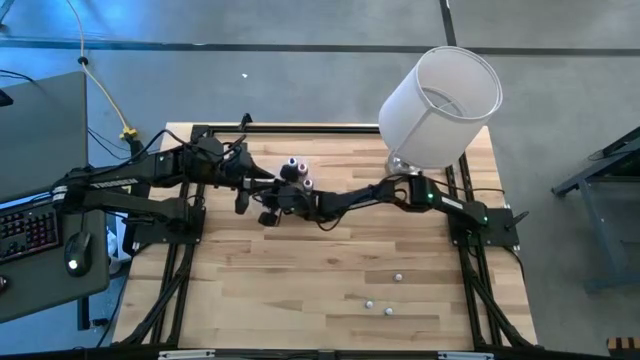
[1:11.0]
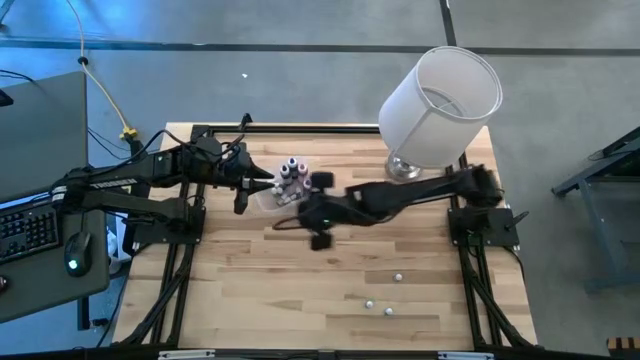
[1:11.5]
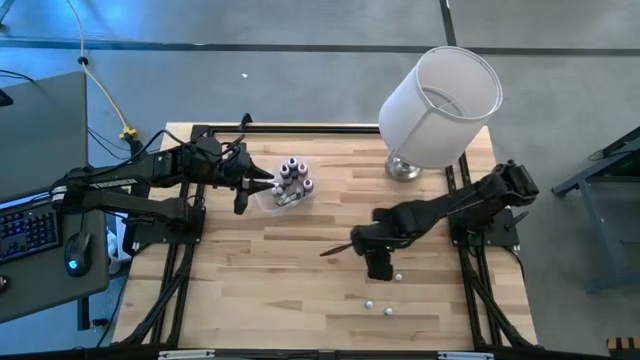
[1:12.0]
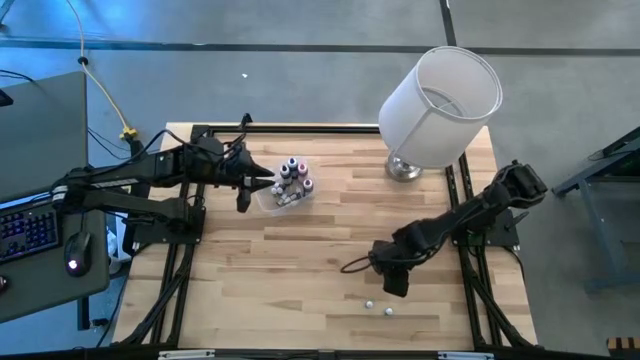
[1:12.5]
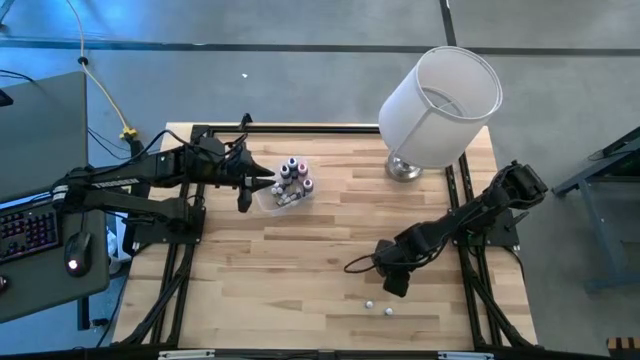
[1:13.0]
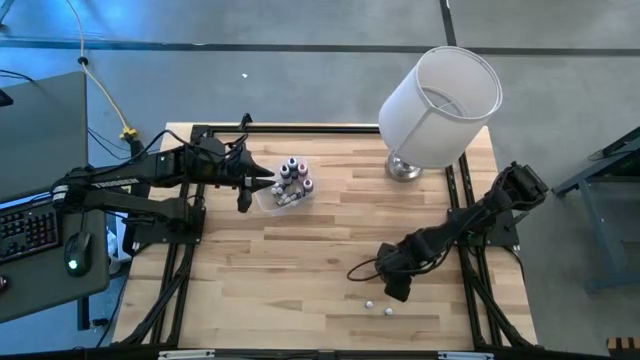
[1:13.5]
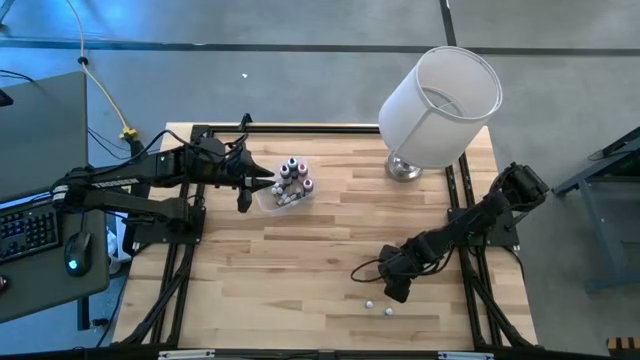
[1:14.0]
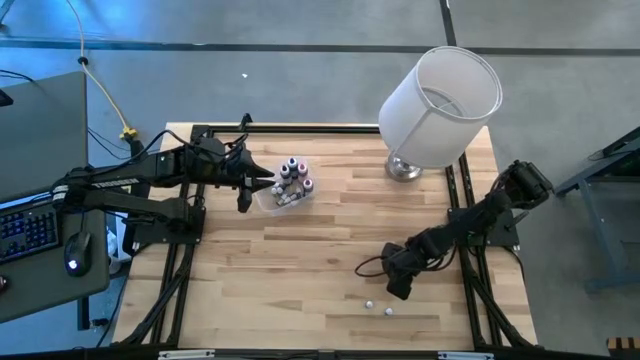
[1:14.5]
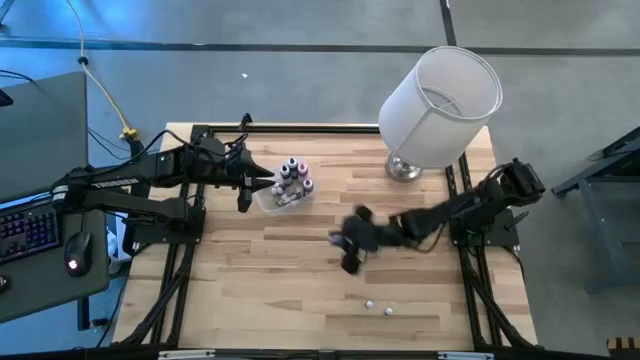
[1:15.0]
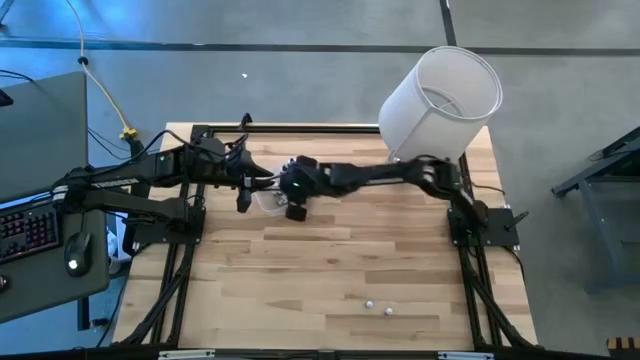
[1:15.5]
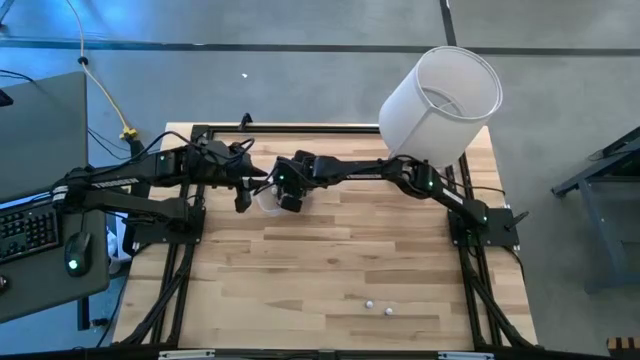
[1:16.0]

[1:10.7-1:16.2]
Task: Pick & Place food coloring
Put the small violet food coloring bottle into the transparent bin

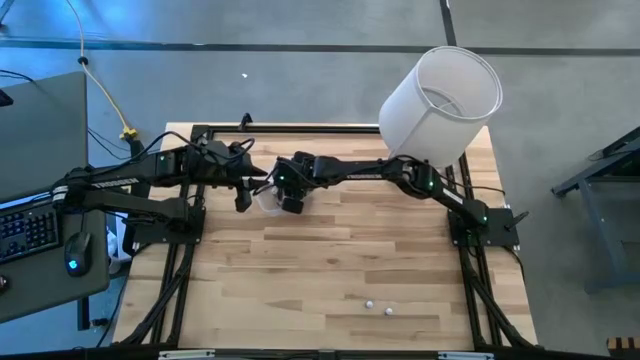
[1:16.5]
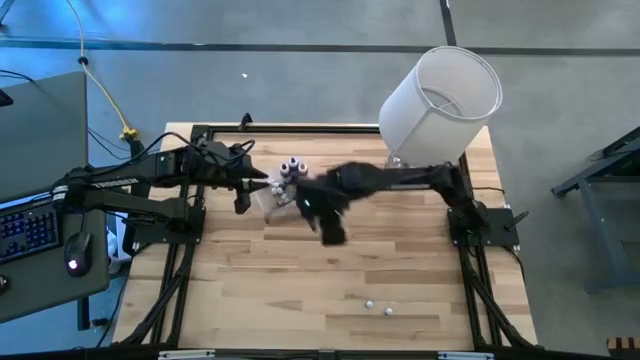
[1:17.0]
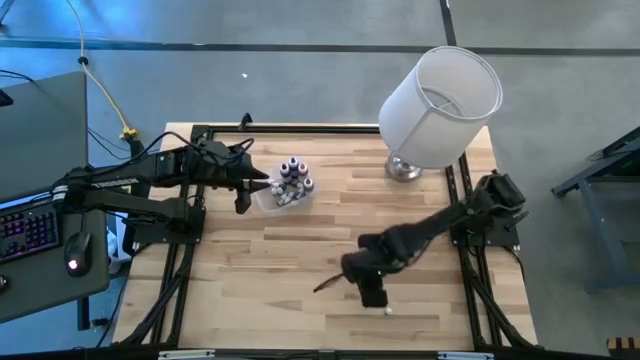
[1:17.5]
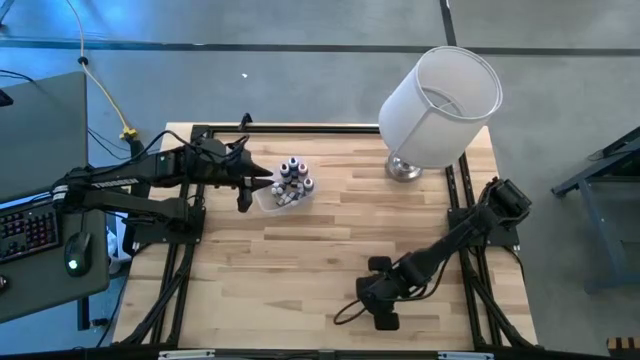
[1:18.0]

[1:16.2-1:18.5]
Put the small purple food coloring bottle into the transparent bin

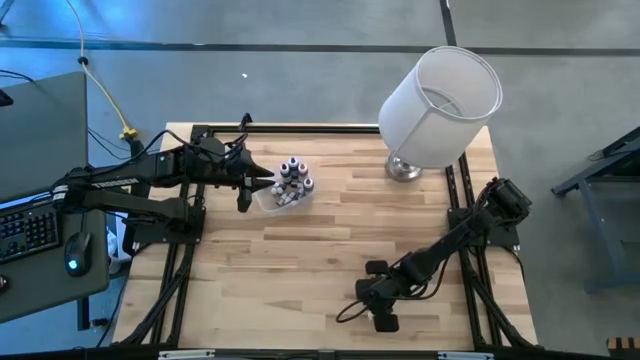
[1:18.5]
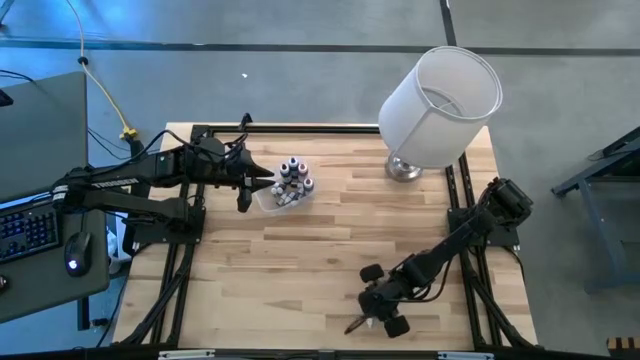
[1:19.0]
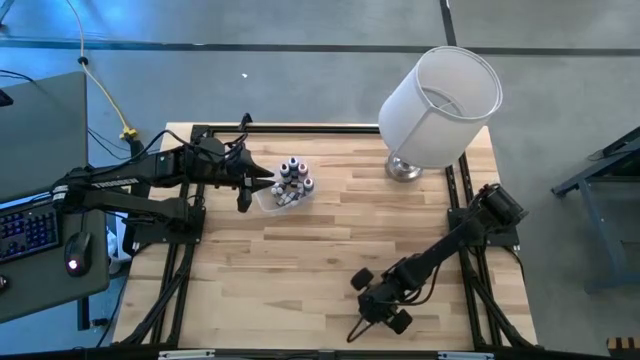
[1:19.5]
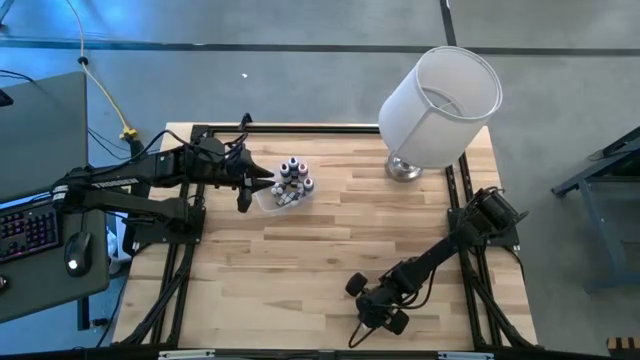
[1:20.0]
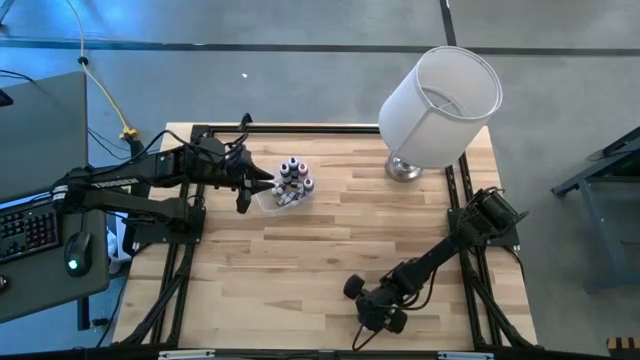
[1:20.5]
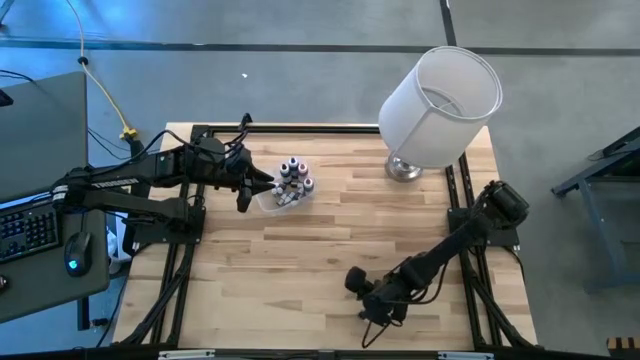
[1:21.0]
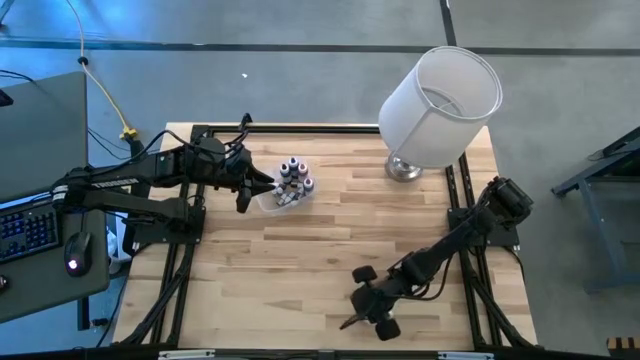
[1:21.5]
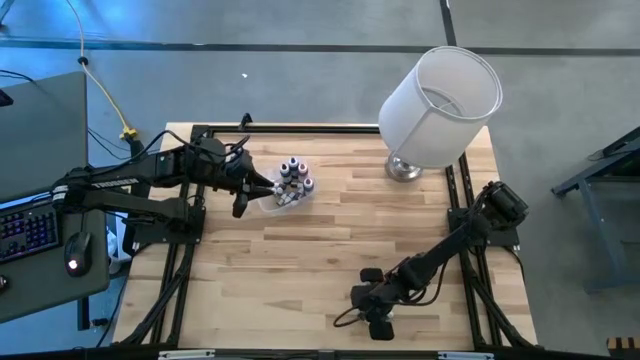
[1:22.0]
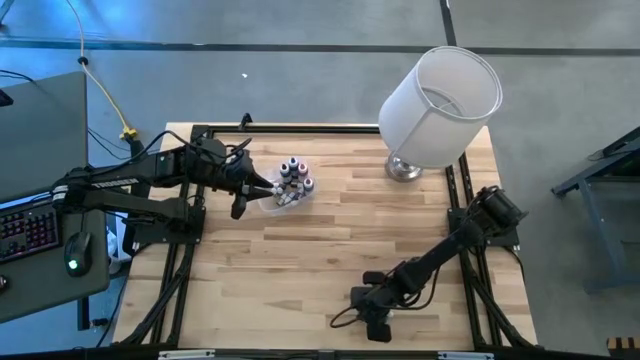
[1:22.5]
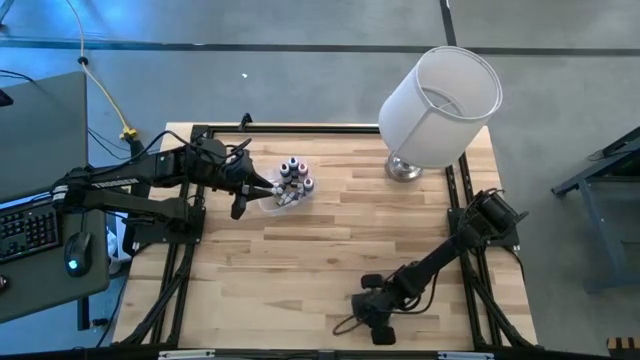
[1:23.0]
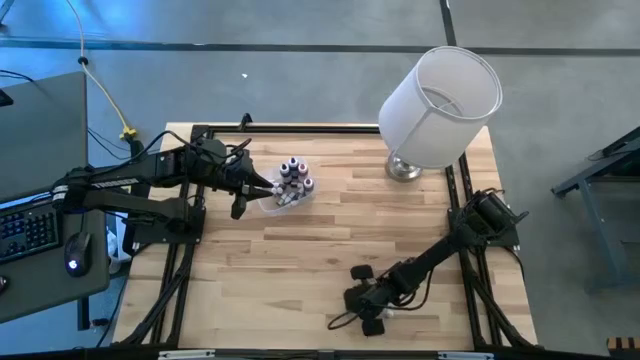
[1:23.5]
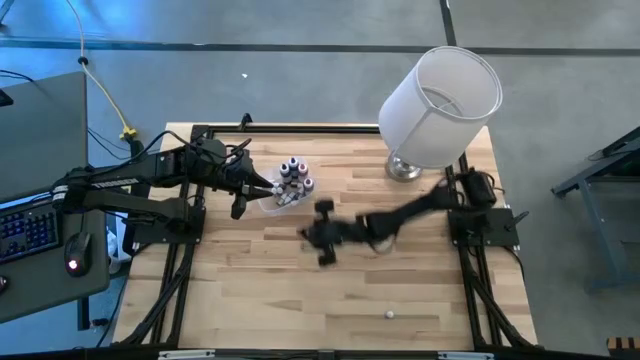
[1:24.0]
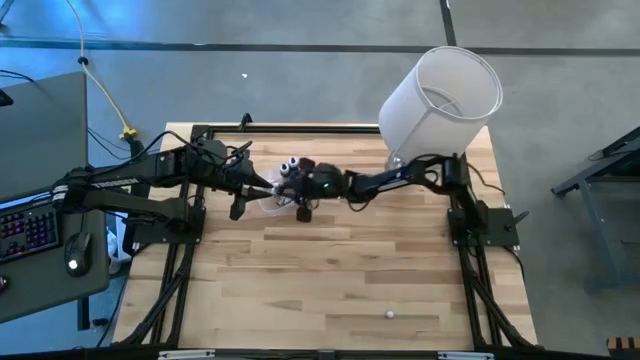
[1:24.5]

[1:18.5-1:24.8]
Put the small purple food coloring bottle into the transparent bin

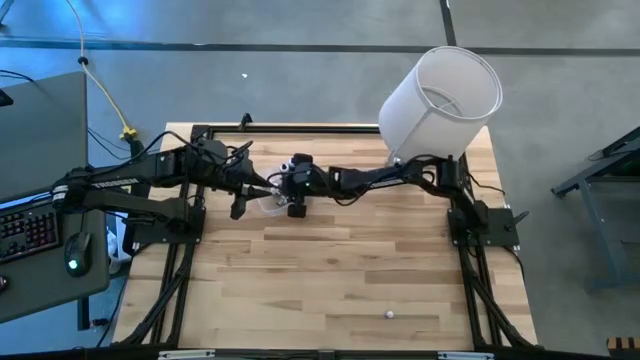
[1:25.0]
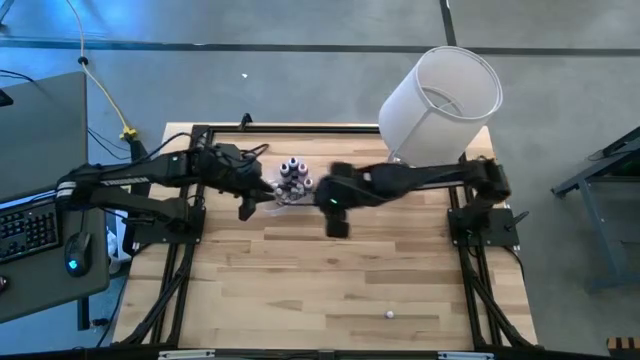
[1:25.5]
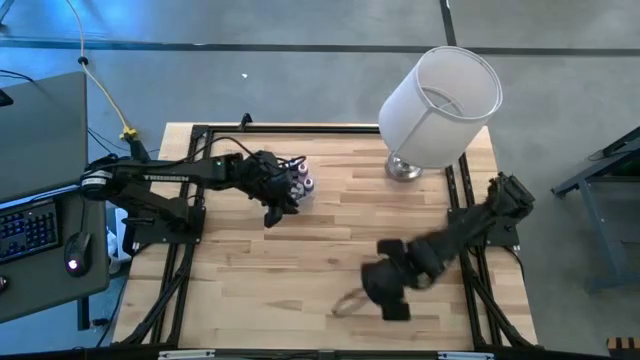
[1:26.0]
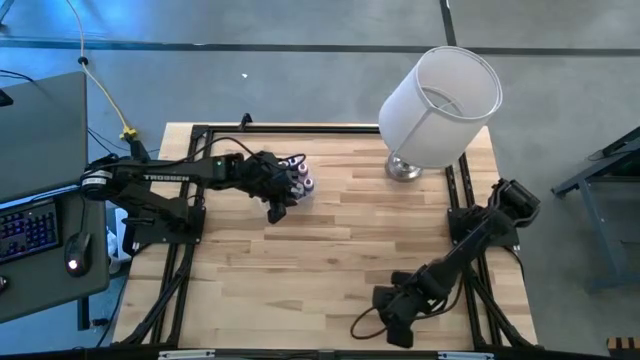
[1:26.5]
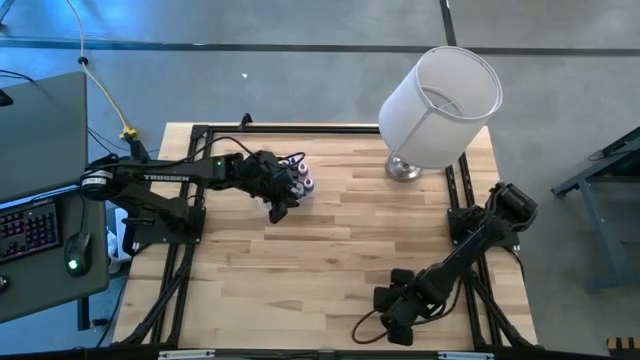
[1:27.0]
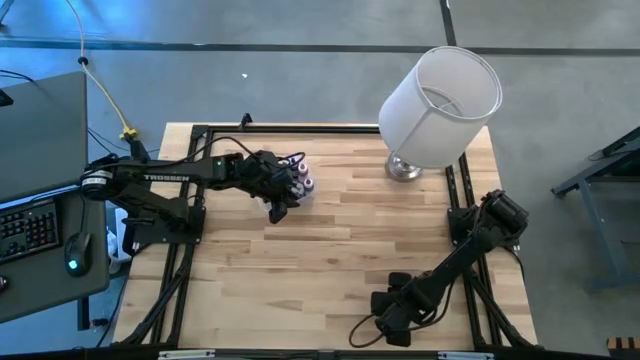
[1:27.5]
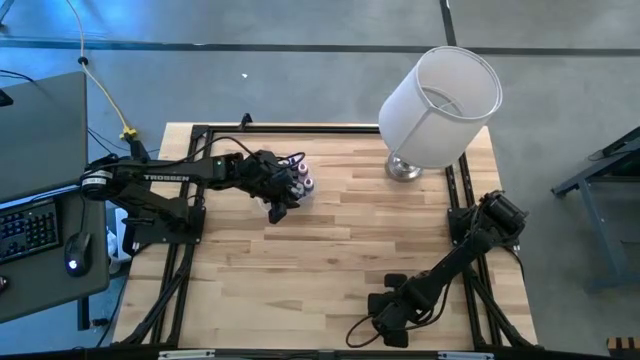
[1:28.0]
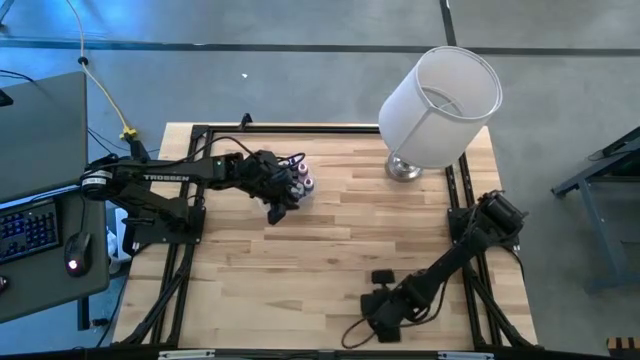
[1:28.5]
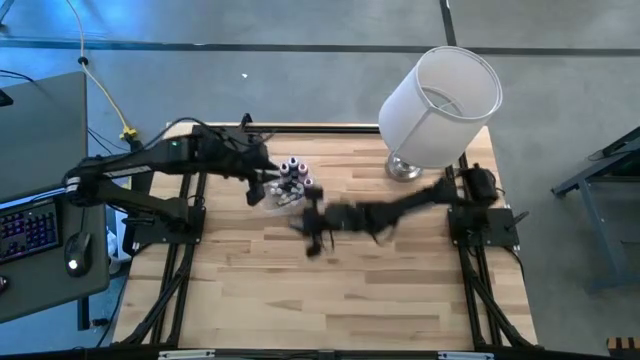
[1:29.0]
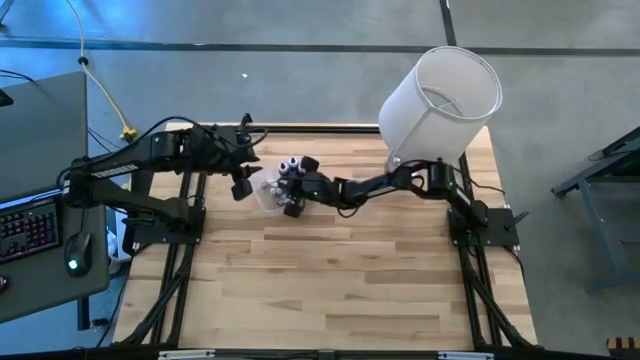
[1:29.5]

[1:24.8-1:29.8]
Put the small brown food coloring bottle into the transparent bin

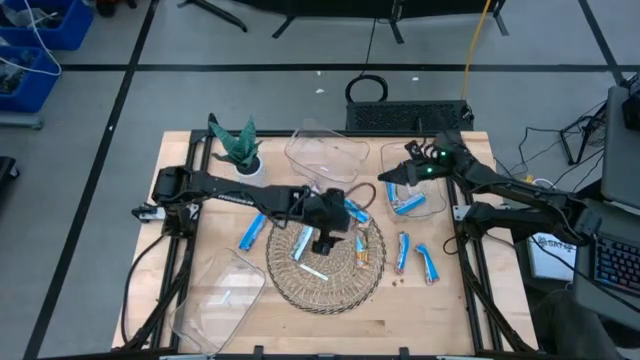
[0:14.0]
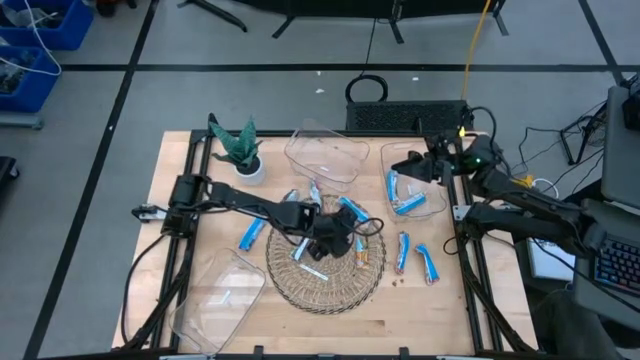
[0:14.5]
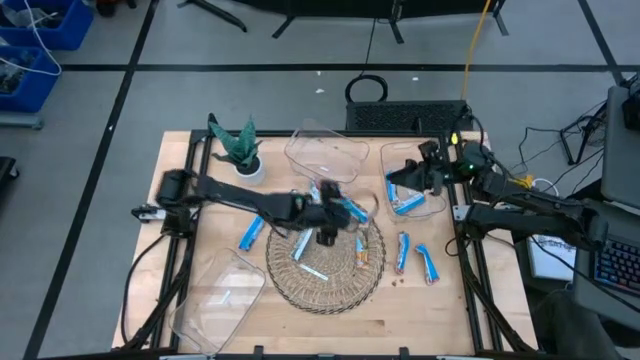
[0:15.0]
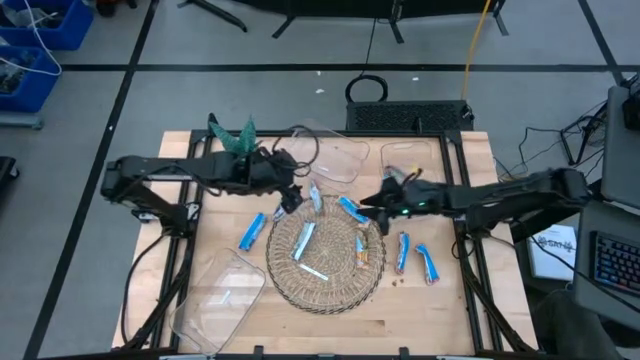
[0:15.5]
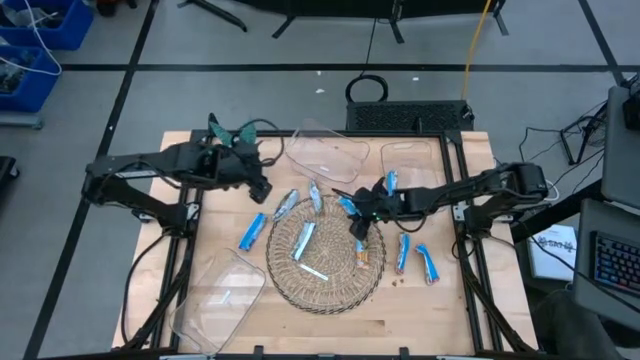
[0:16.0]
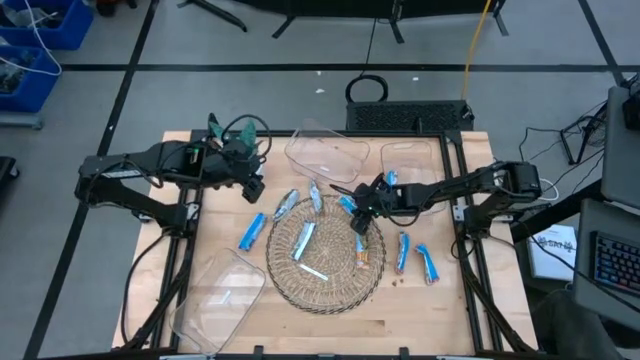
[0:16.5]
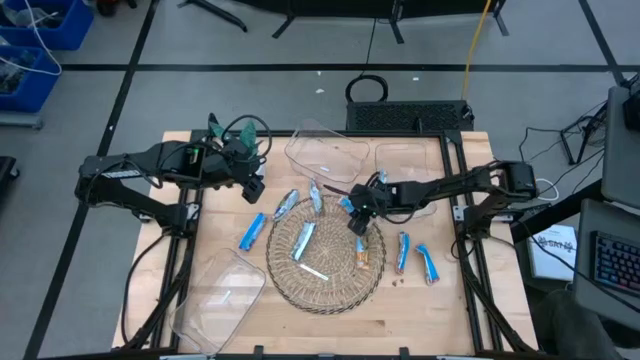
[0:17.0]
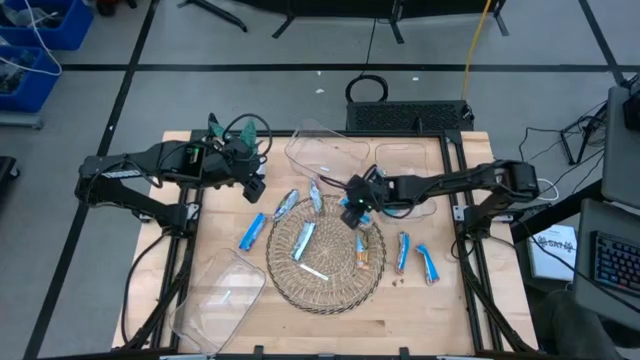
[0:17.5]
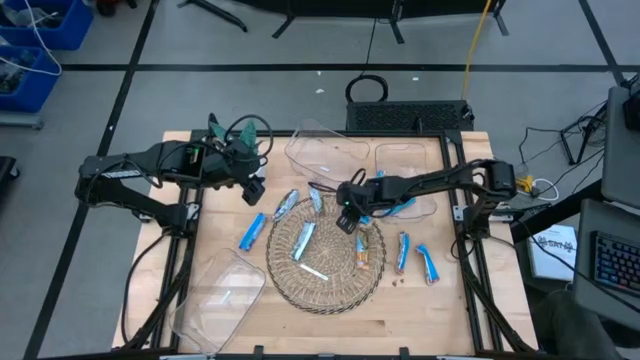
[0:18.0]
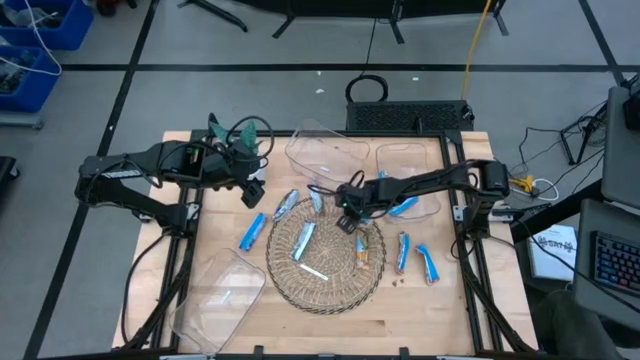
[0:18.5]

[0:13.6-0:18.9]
Task: Pick and place Granola Bars by type
Put the top yellow granola bar into the top right transparent bin
